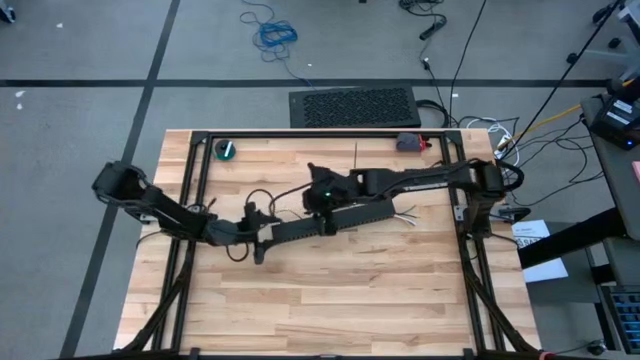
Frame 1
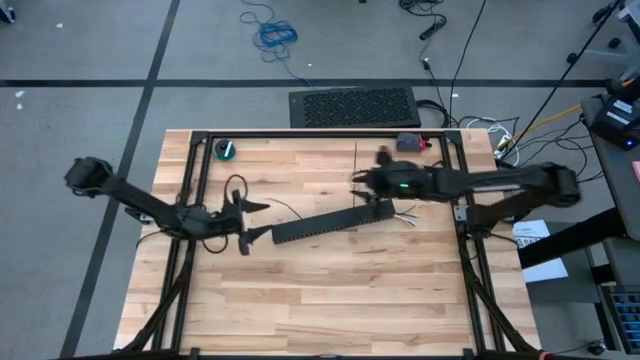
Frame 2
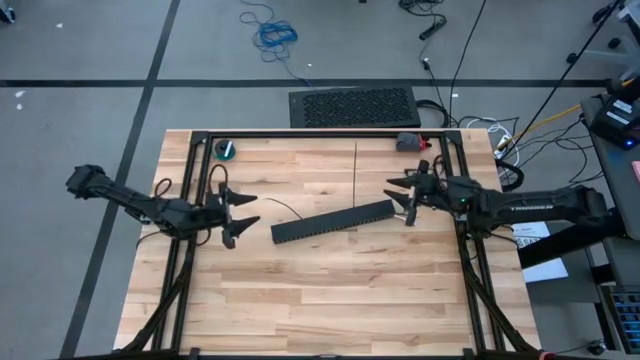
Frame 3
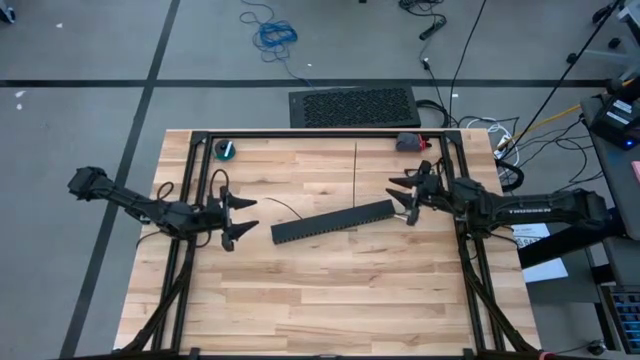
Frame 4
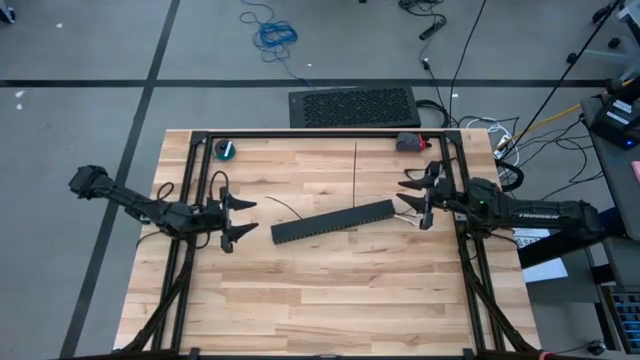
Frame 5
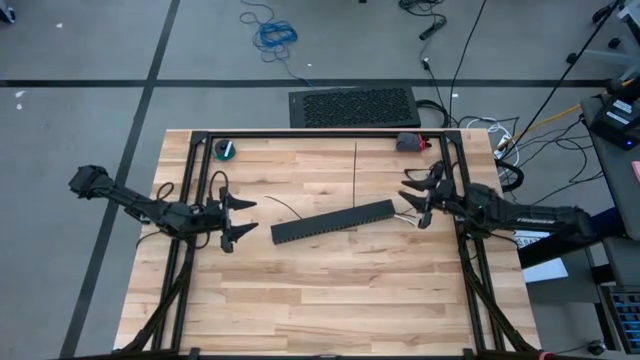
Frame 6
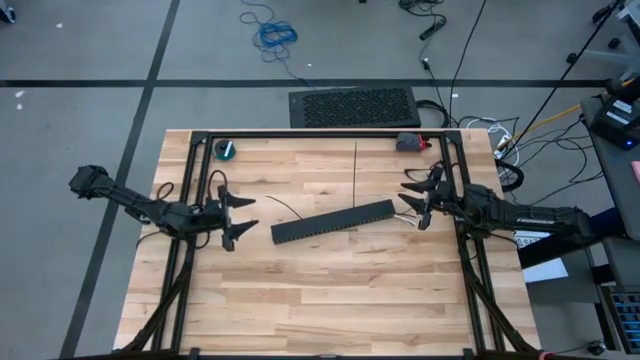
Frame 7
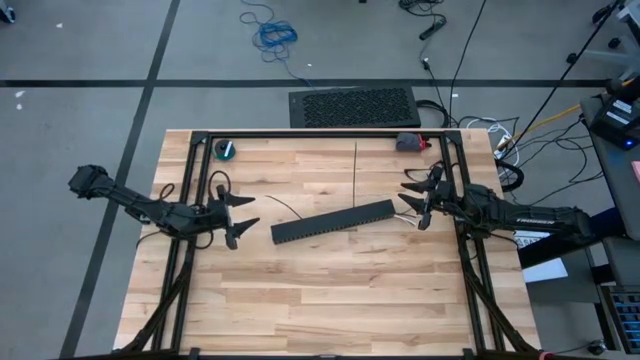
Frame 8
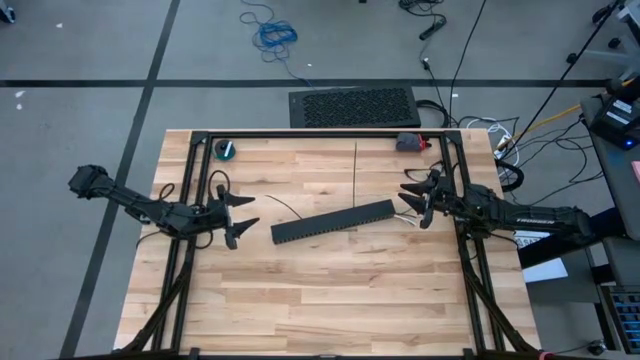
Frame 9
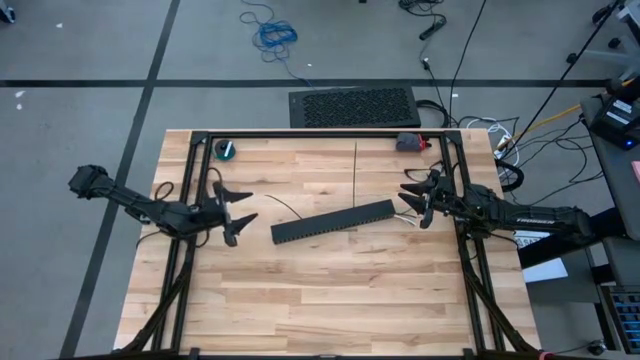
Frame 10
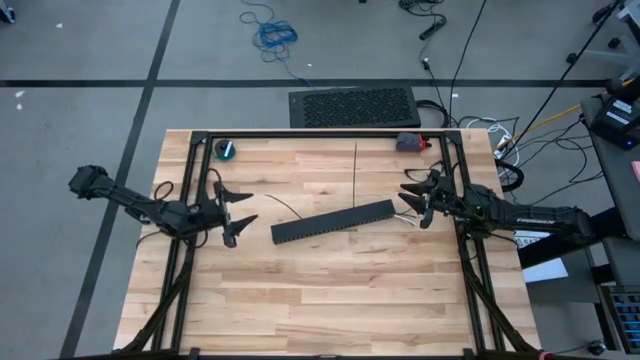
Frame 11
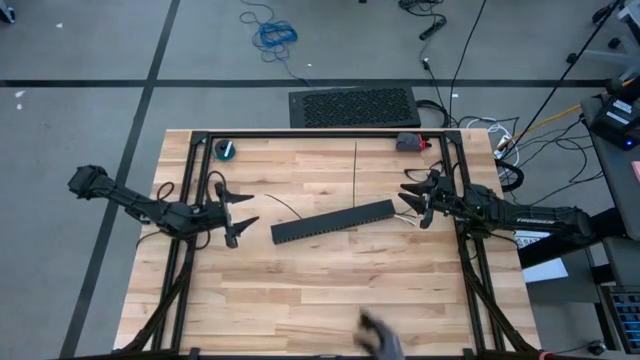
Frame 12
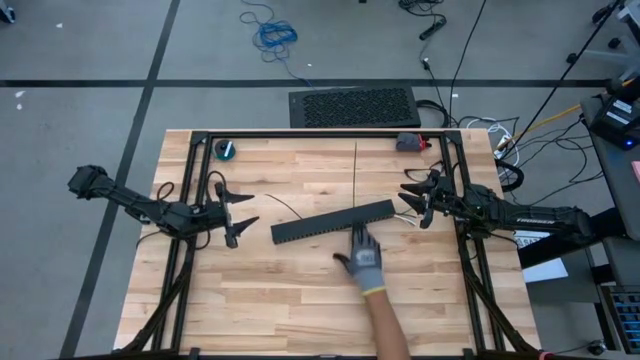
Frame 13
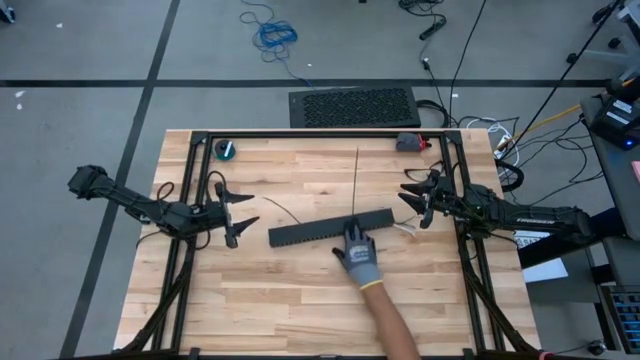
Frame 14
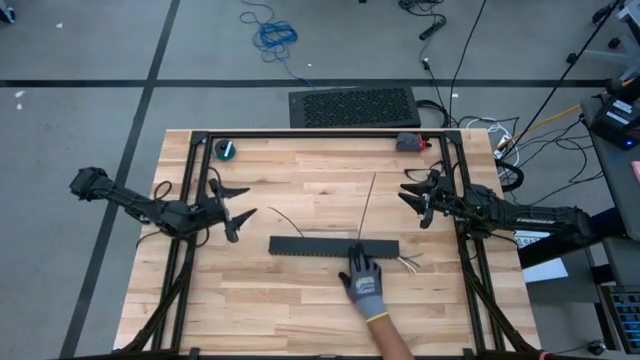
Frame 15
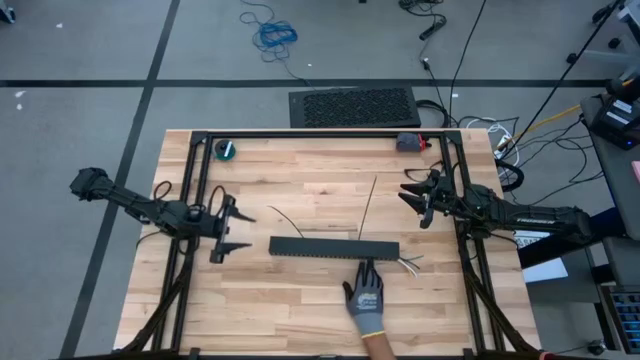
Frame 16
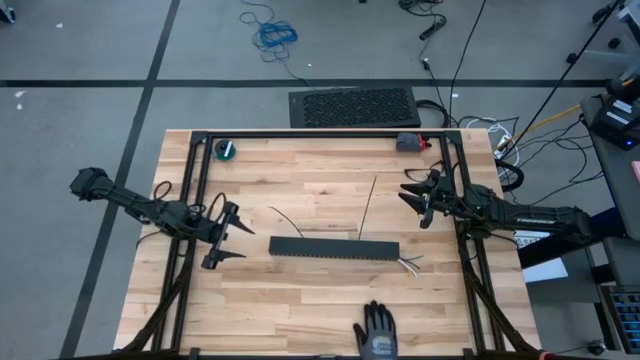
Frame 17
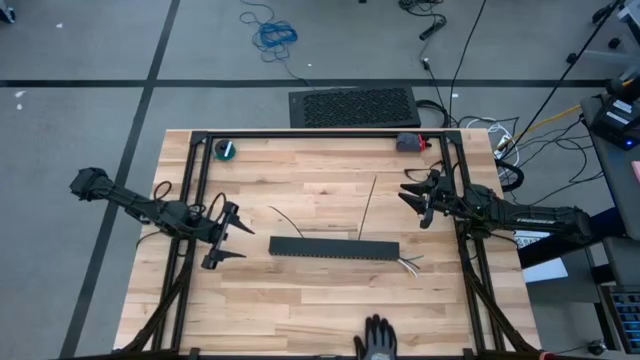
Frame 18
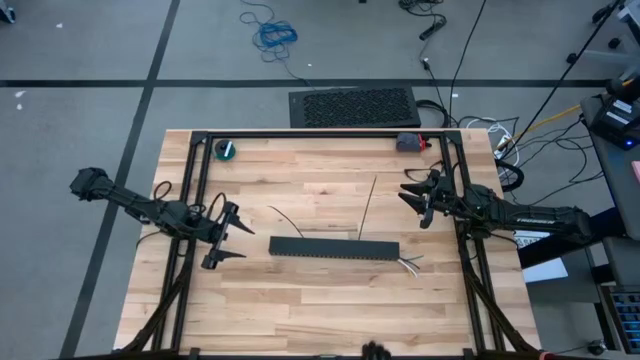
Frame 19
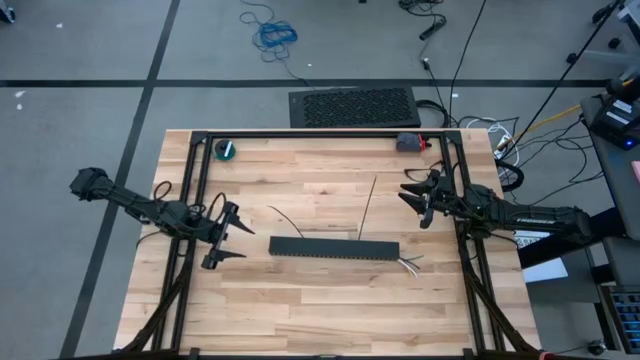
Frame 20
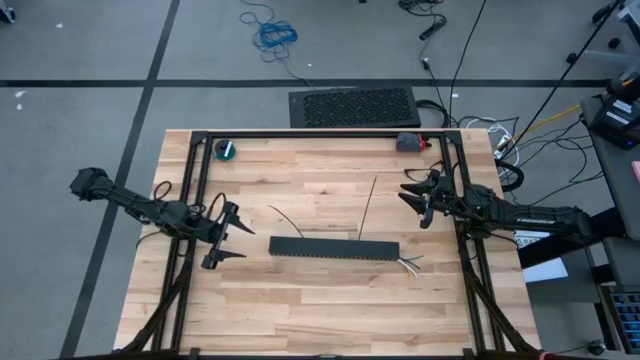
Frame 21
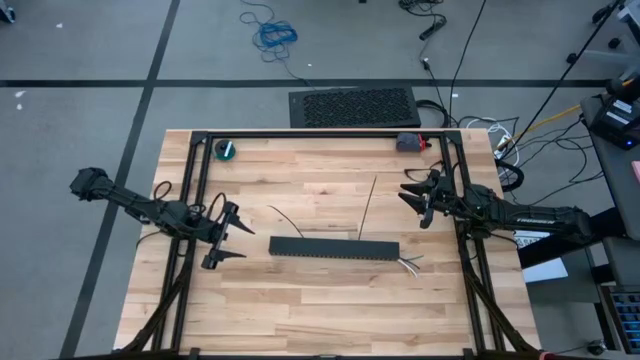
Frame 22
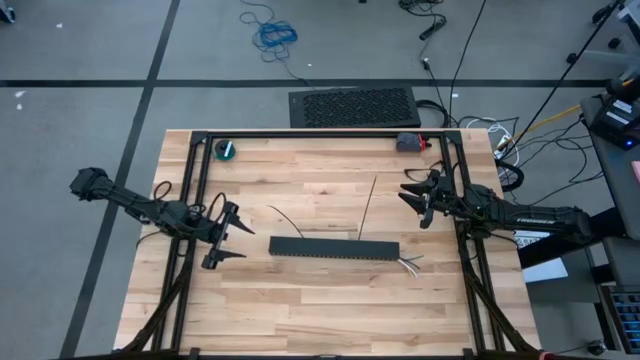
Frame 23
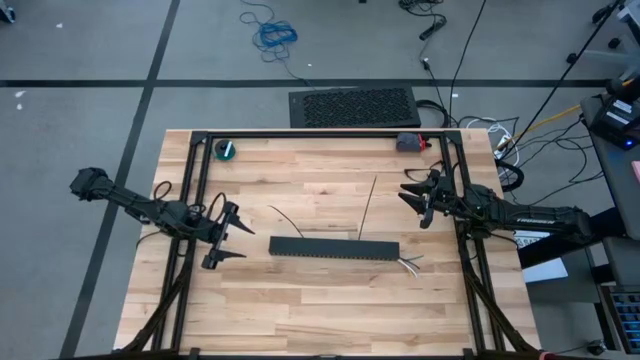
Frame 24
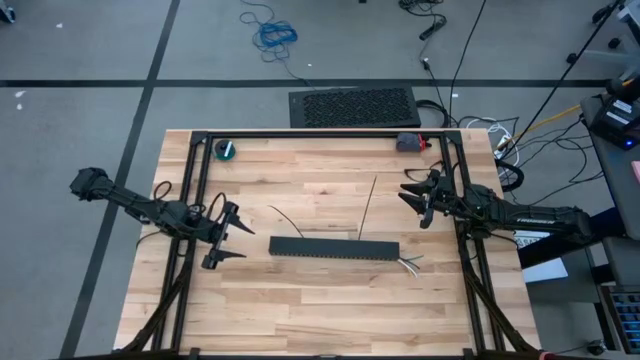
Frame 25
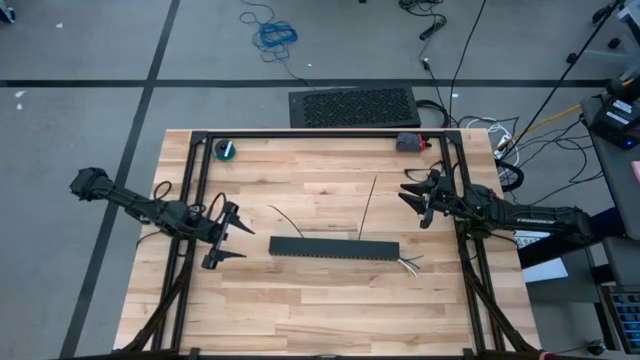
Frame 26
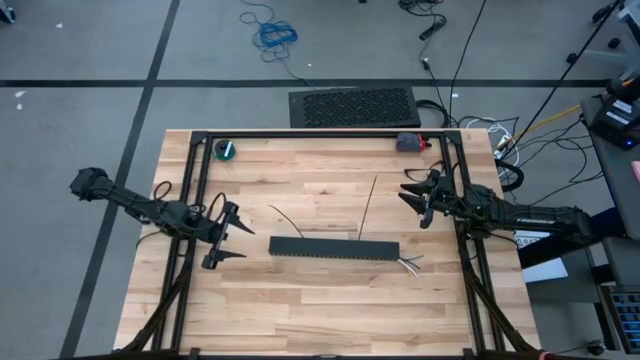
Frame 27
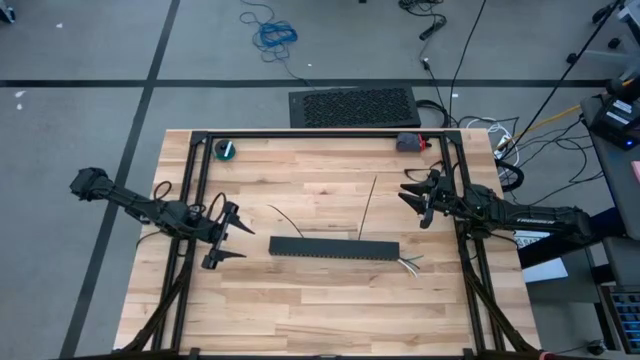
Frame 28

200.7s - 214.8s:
Task: Ziptie cables
Return to Home Position
